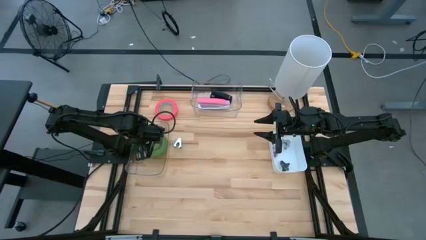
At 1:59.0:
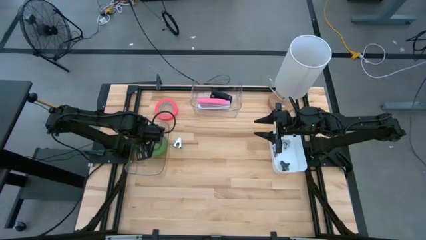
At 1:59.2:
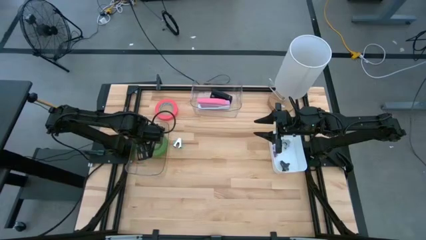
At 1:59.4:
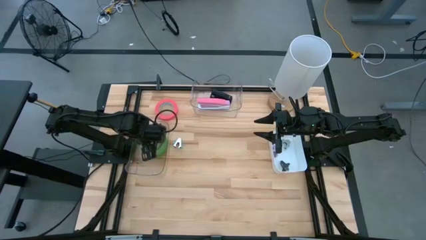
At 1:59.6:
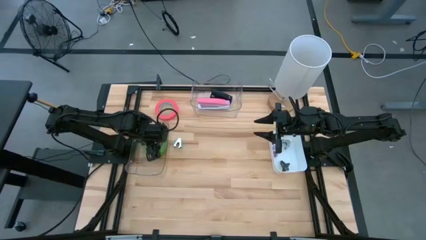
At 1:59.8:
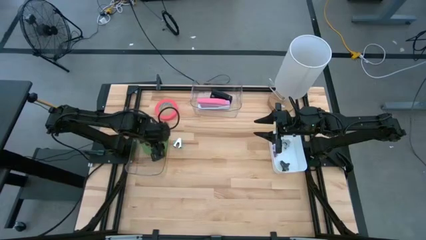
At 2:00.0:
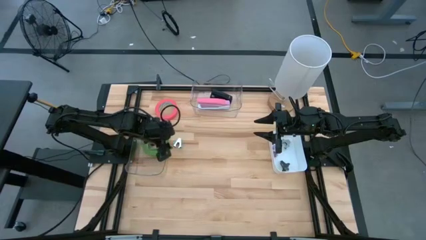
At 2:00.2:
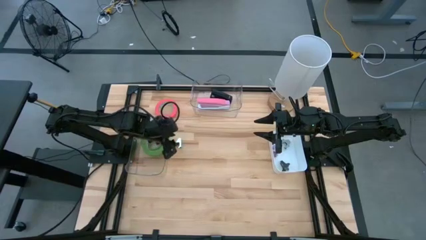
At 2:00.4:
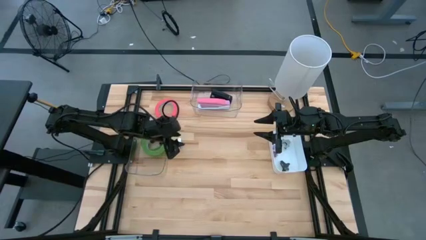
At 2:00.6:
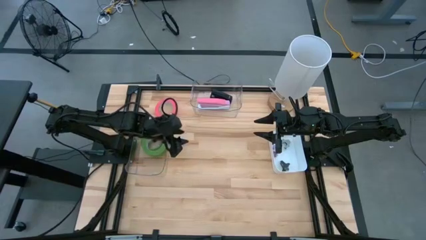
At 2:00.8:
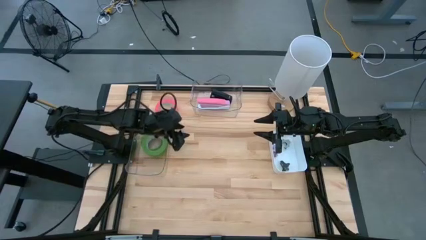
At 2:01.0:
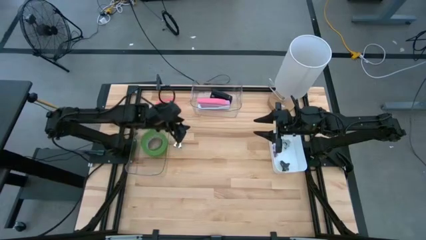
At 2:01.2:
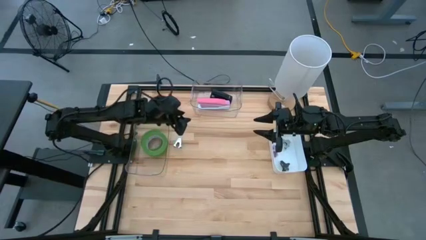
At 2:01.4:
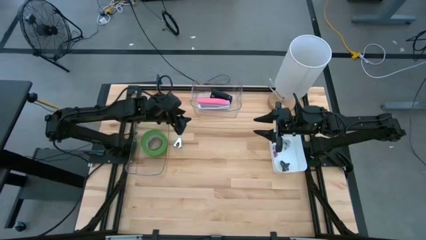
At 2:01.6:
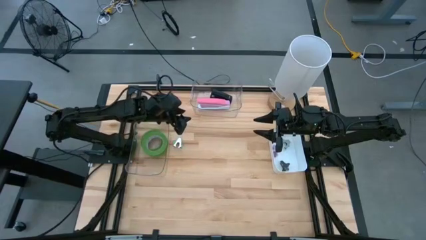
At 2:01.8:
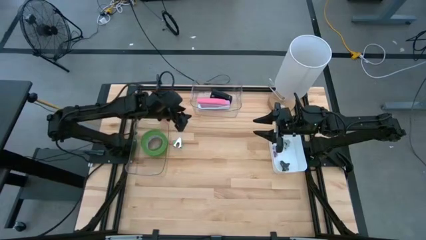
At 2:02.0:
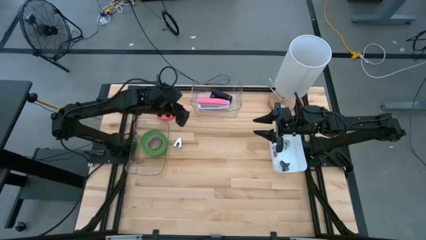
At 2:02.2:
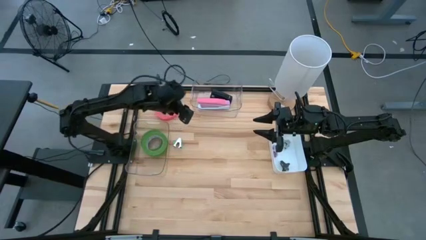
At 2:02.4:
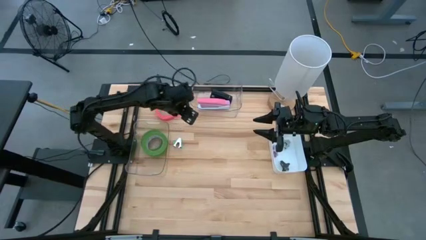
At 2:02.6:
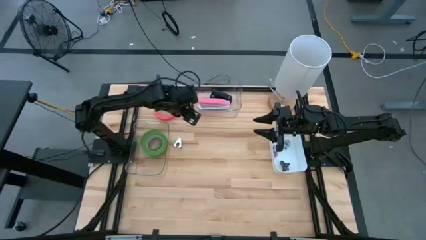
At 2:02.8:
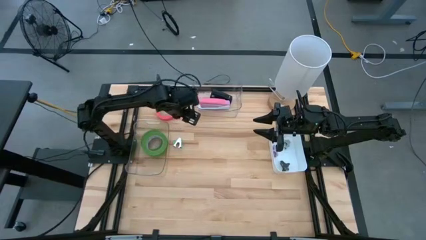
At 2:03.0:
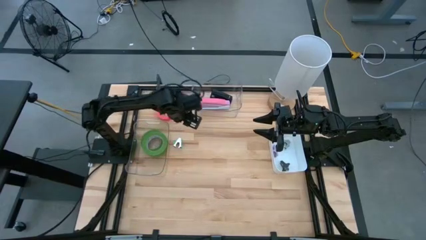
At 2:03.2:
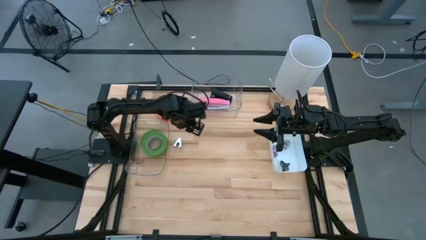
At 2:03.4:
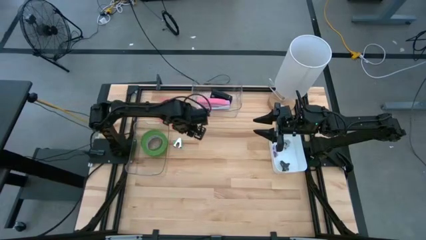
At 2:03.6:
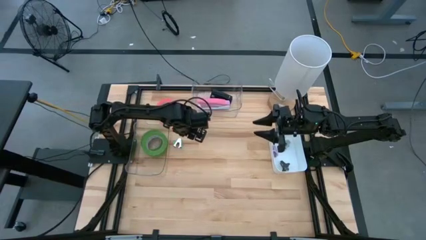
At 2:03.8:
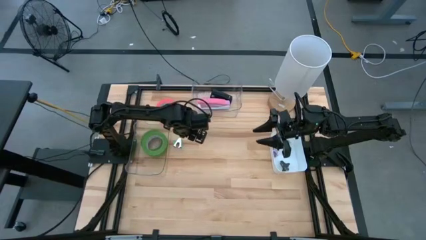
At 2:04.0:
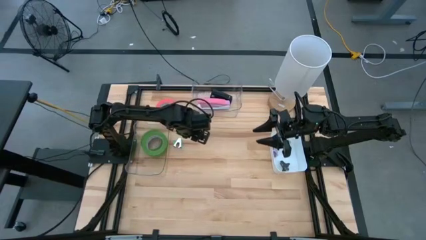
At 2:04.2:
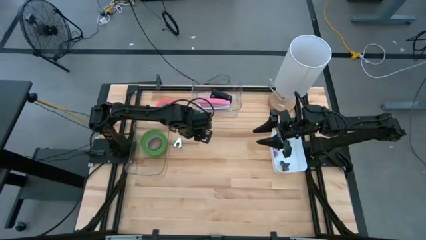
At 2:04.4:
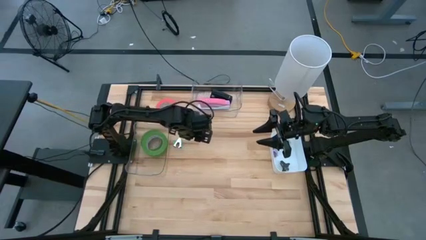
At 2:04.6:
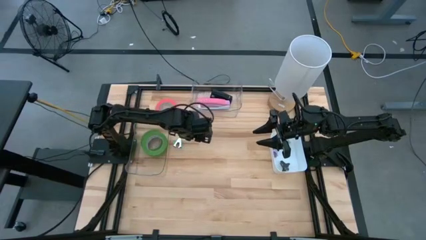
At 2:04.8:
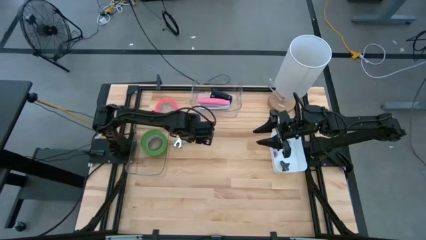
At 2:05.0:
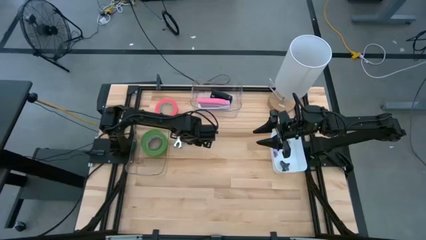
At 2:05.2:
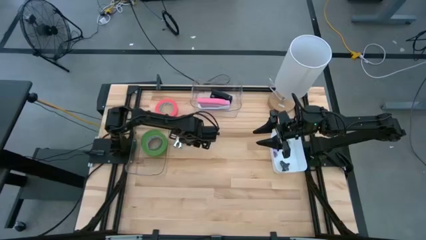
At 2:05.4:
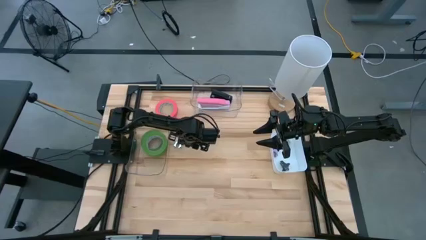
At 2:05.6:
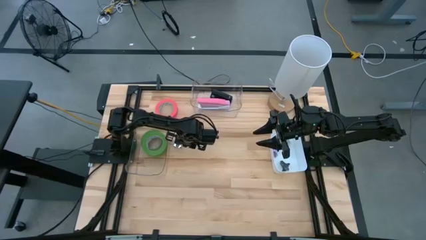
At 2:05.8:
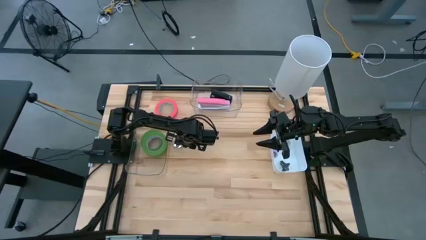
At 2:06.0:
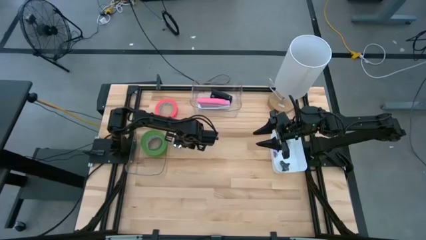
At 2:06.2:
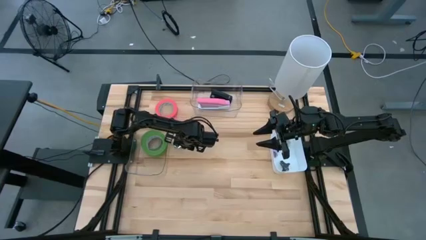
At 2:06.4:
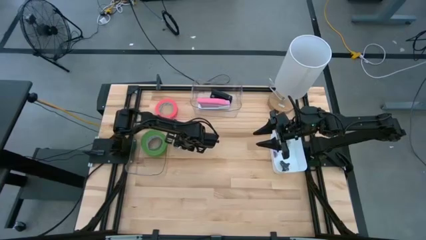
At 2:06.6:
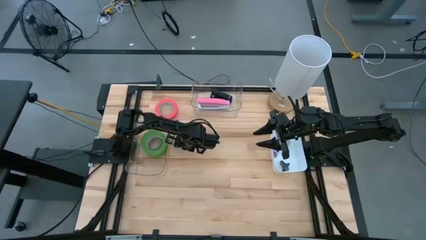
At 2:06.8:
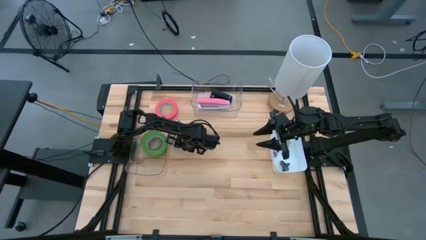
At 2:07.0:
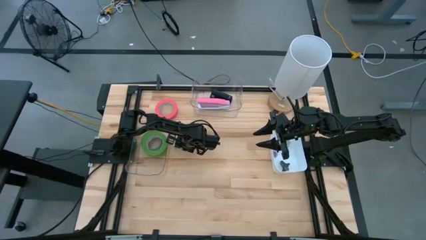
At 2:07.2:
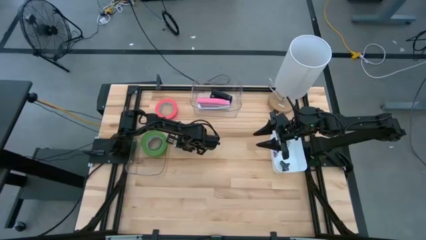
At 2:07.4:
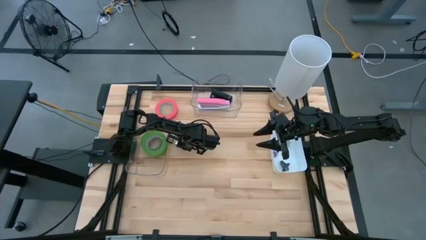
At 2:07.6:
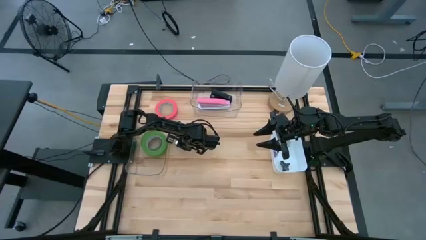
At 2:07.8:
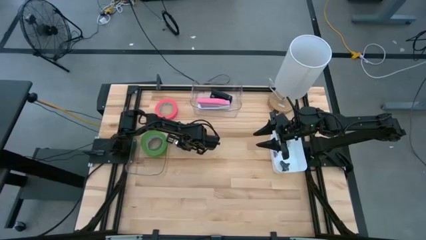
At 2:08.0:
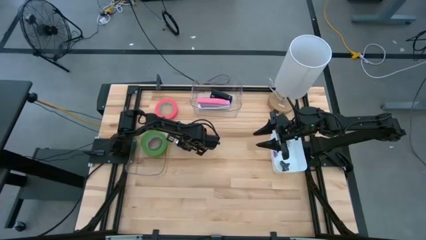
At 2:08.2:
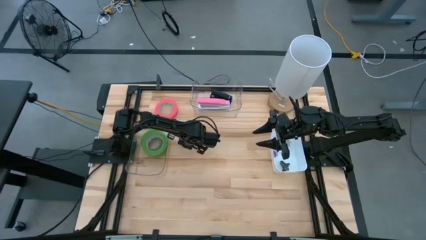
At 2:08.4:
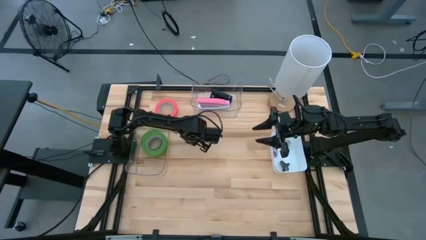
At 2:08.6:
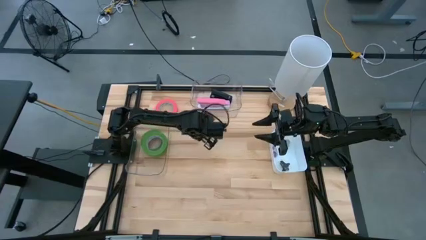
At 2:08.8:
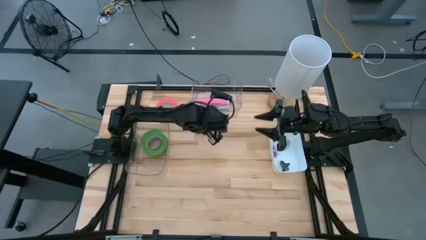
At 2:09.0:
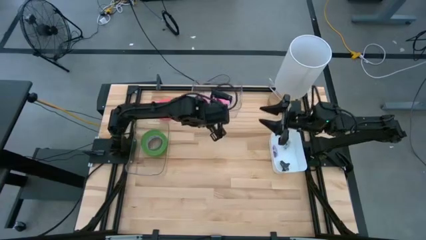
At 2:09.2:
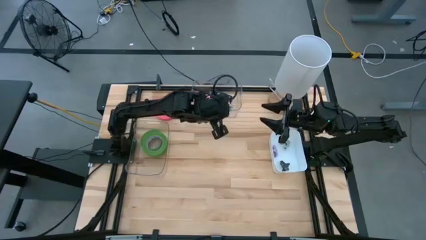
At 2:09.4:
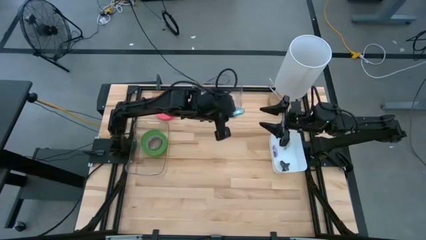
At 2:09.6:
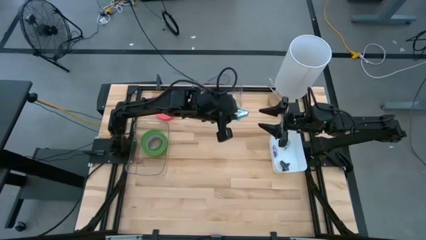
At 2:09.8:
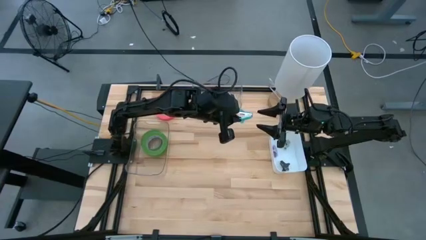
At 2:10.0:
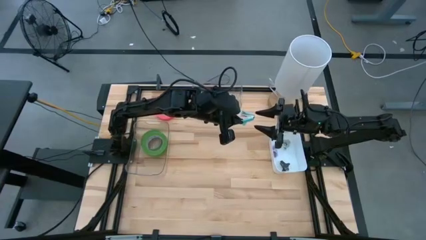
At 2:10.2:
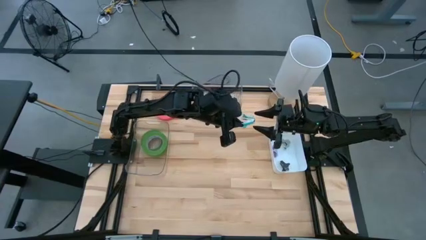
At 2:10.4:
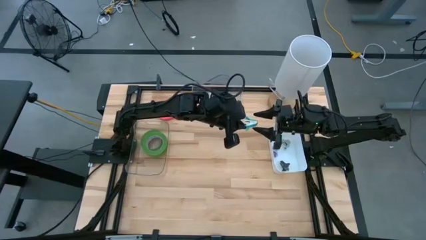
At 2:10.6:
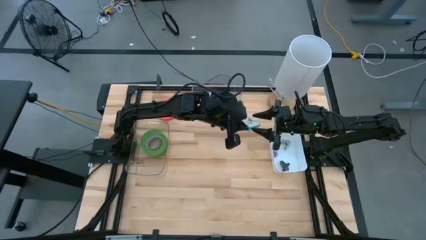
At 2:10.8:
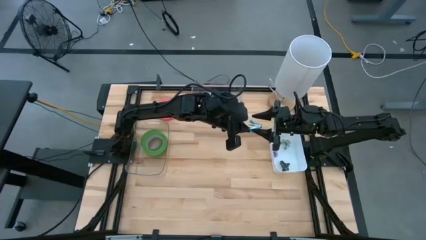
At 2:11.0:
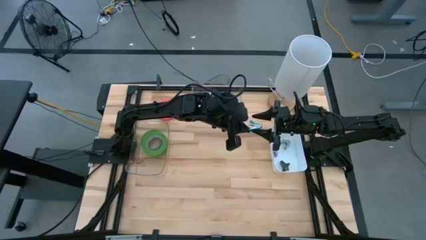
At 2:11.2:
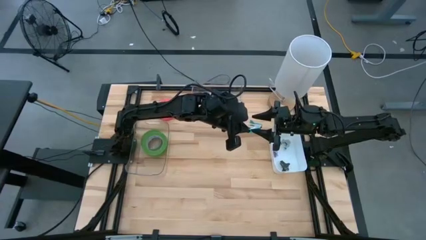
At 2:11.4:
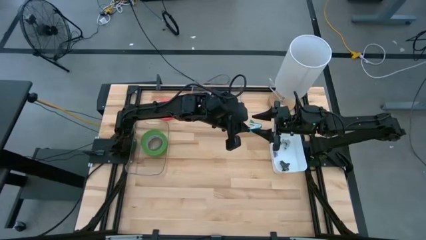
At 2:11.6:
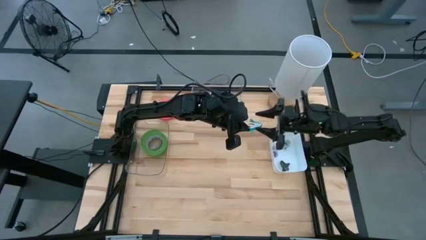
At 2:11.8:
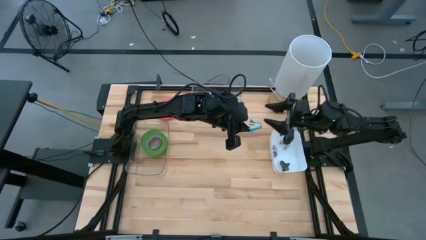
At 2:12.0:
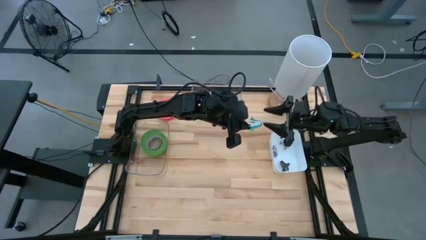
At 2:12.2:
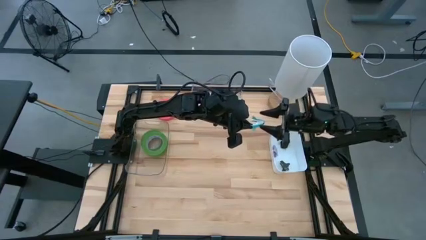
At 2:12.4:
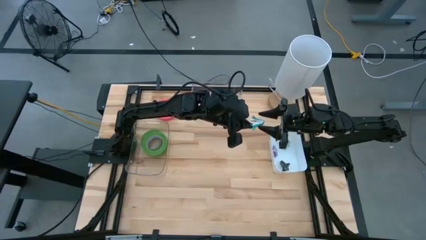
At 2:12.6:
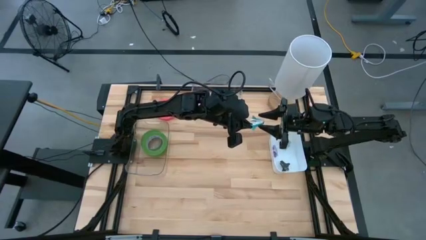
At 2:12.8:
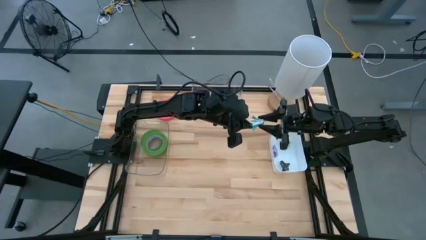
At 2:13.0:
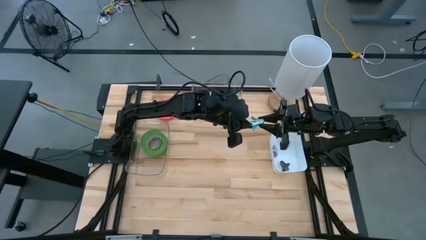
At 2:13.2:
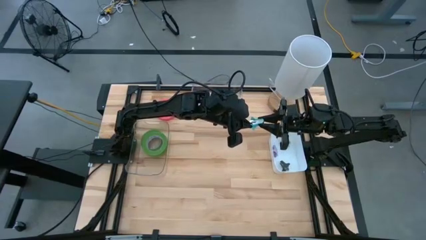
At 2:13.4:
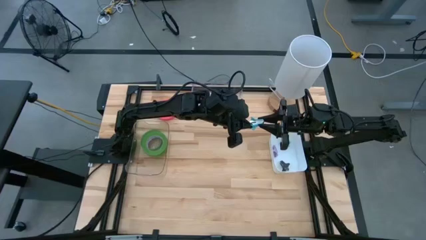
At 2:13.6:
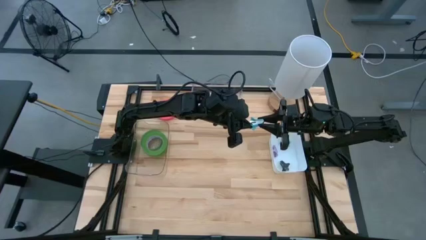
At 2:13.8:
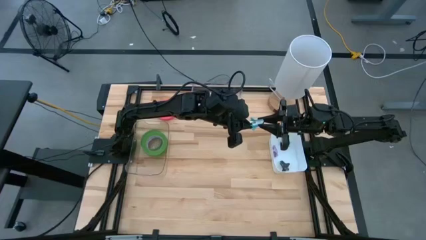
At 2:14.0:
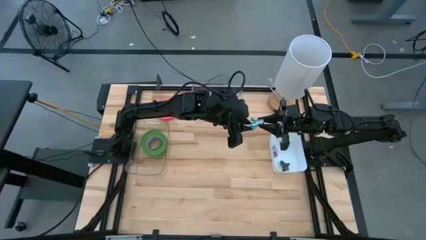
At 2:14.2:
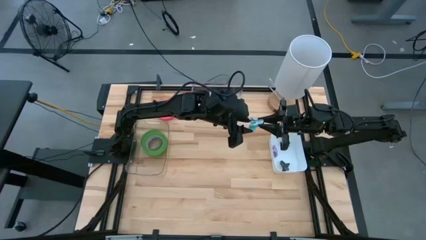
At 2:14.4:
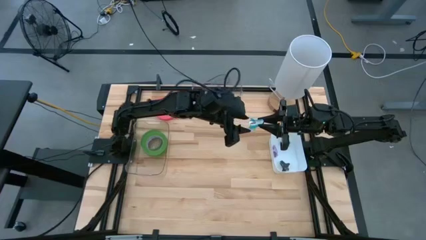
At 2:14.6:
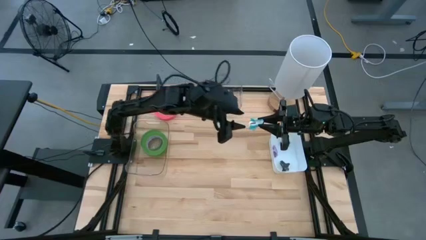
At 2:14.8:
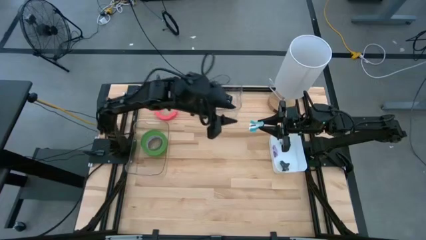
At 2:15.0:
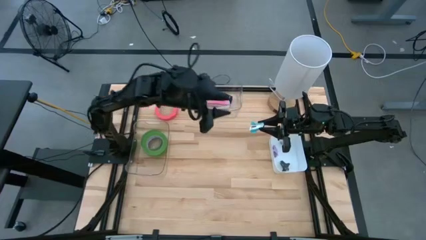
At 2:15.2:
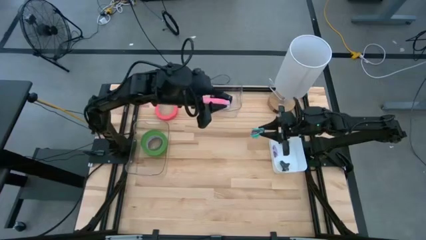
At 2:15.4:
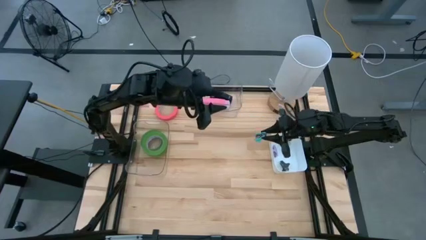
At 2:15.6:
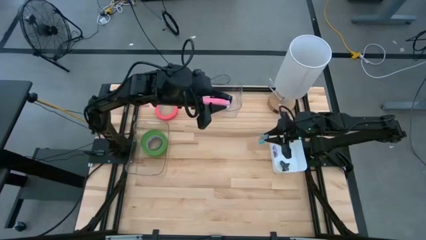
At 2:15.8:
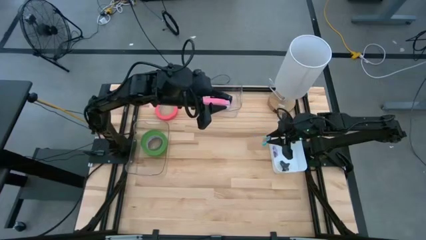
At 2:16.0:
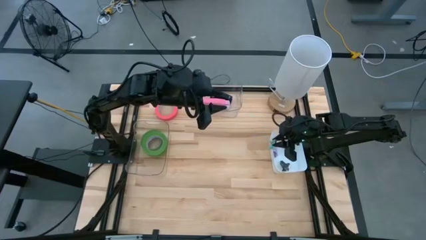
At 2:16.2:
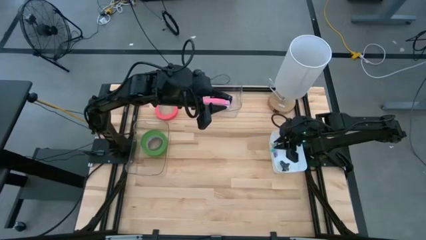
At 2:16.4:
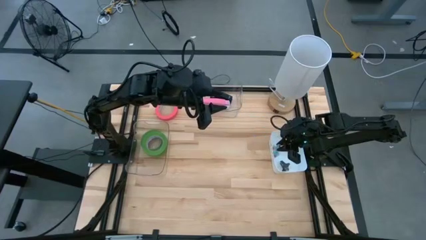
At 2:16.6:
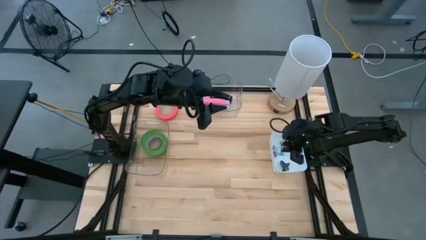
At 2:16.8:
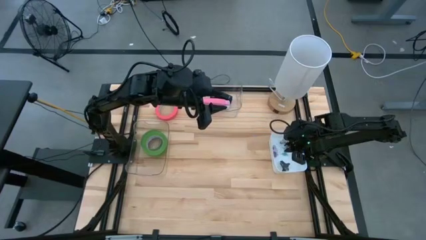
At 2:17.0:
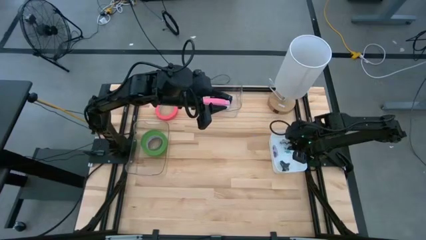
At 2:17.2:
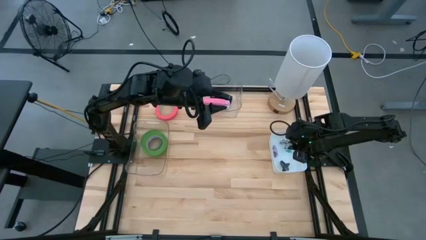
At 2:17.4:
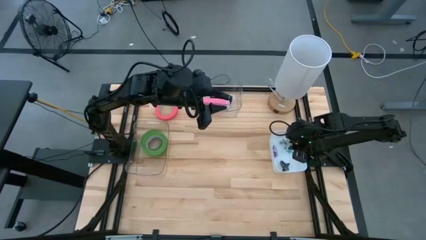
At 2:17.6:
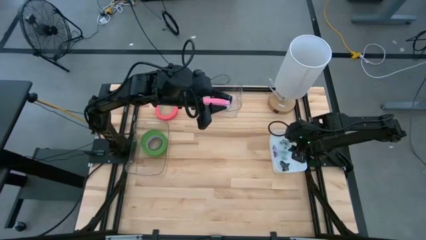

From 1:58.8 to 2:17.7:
Task: Pick and place Stapler, Stapler remover, tape
Put the blue staple remover into the white bin
